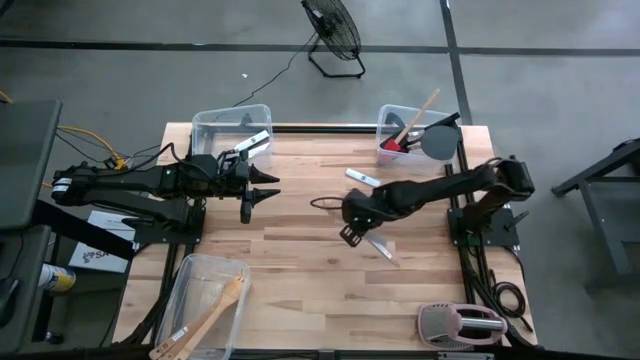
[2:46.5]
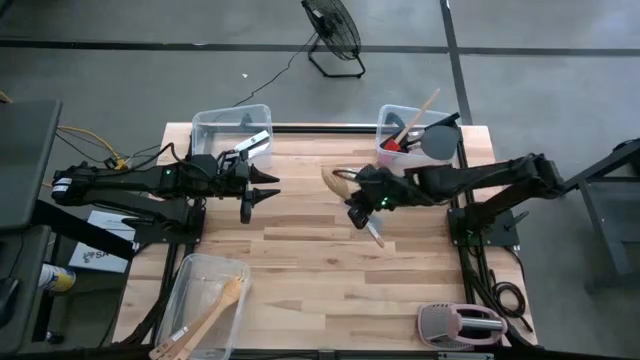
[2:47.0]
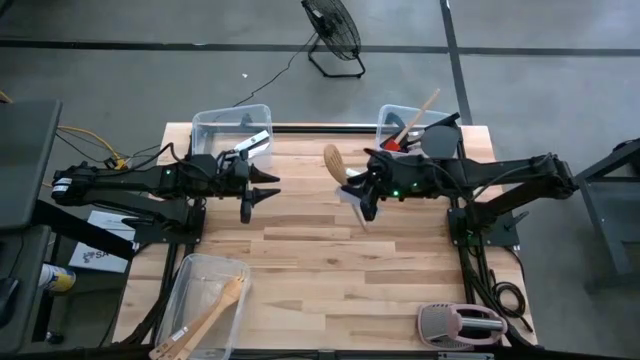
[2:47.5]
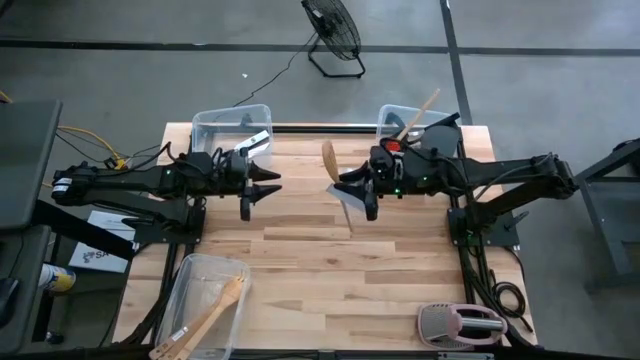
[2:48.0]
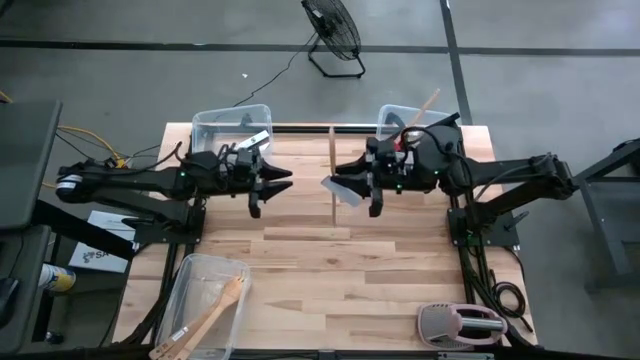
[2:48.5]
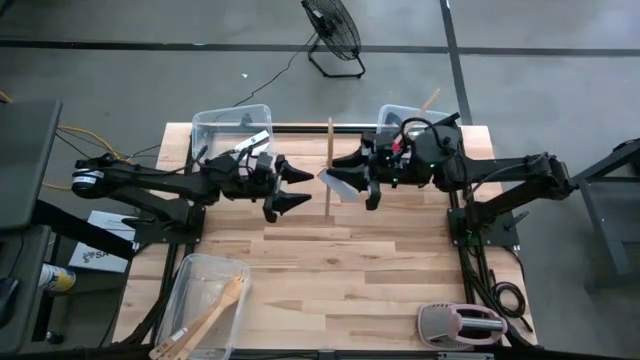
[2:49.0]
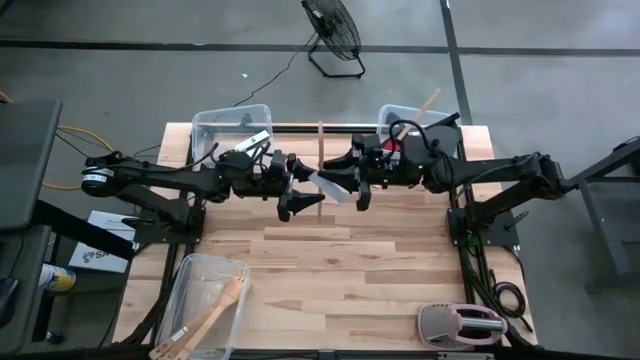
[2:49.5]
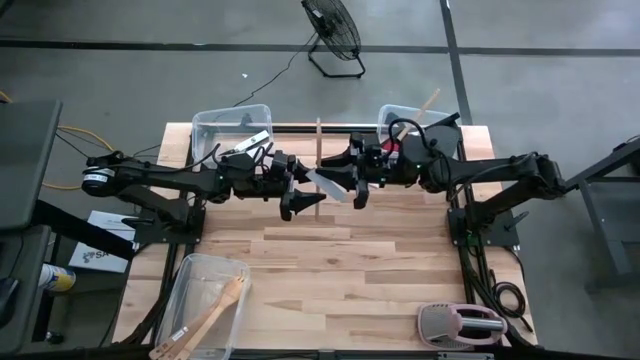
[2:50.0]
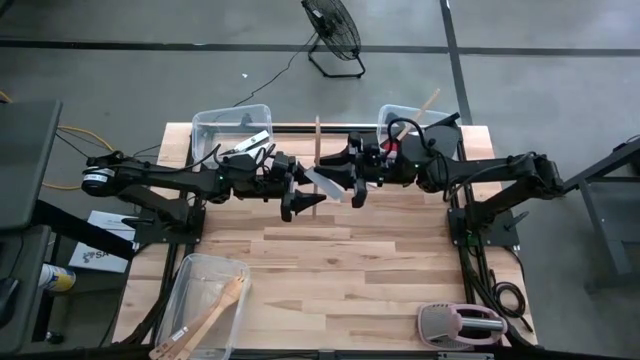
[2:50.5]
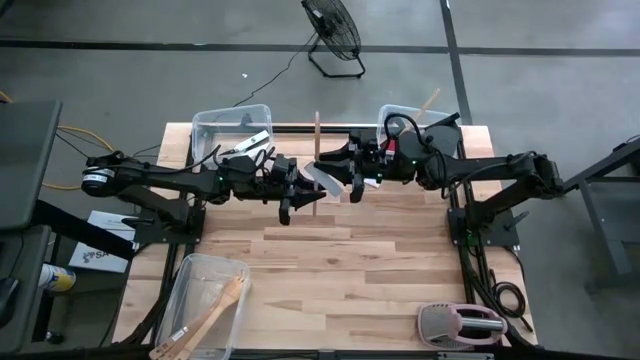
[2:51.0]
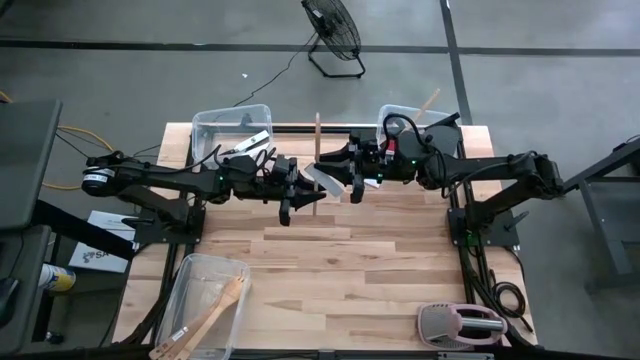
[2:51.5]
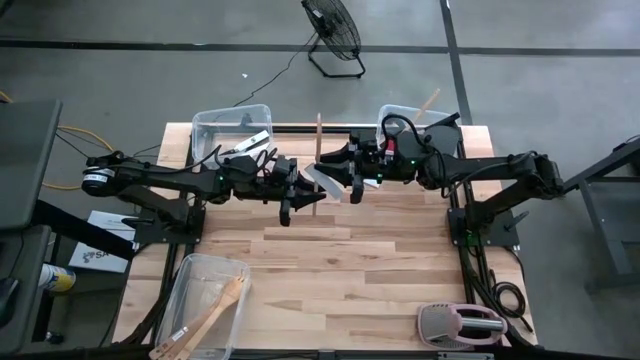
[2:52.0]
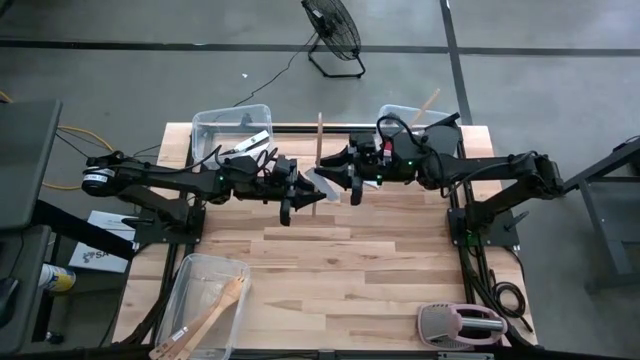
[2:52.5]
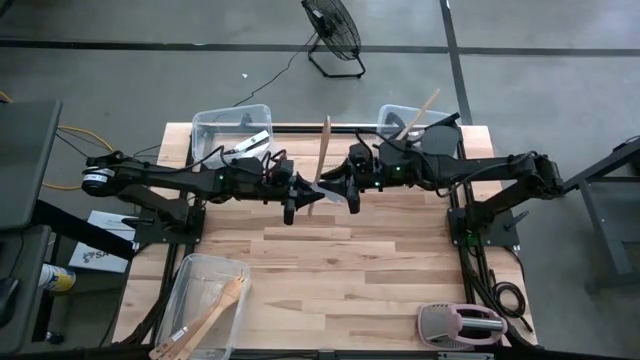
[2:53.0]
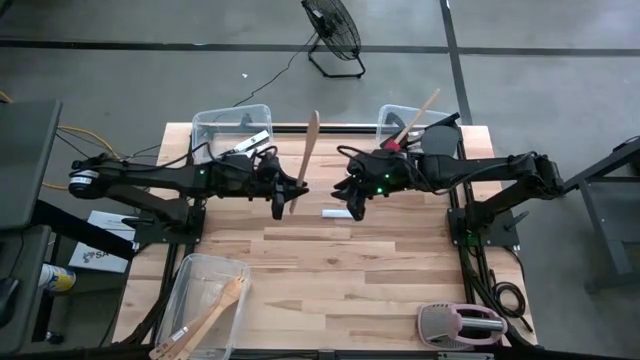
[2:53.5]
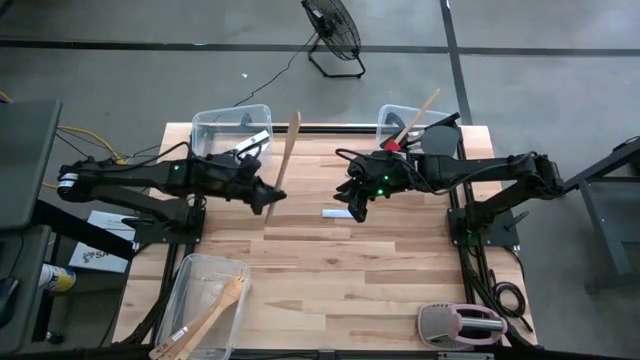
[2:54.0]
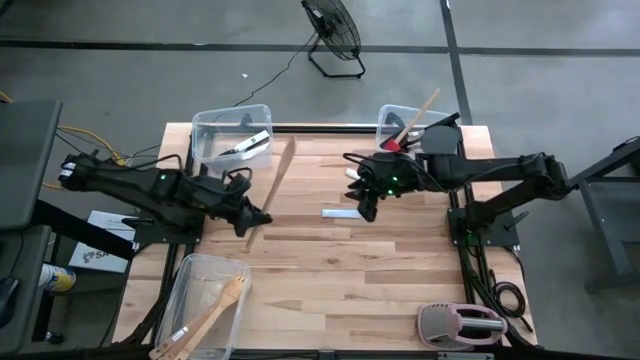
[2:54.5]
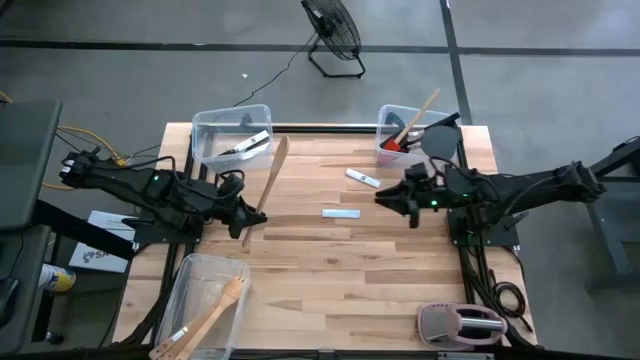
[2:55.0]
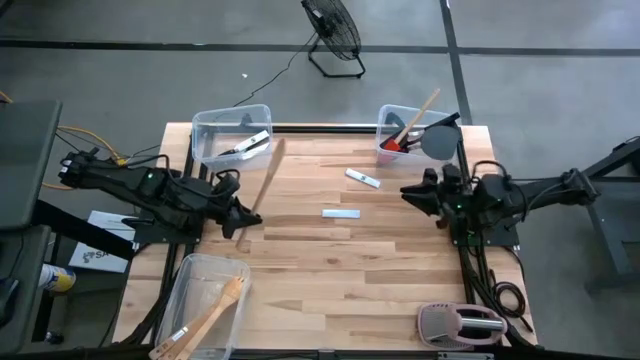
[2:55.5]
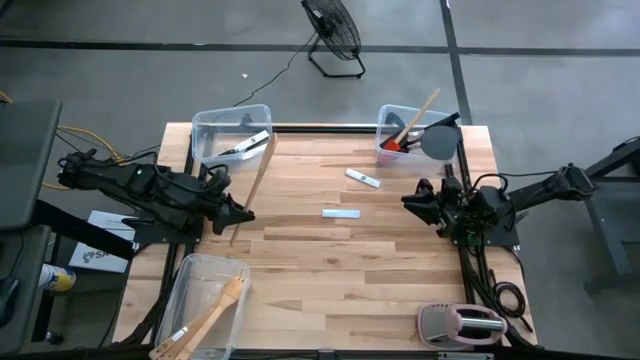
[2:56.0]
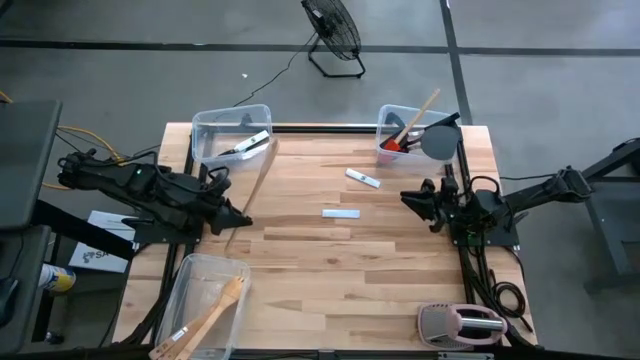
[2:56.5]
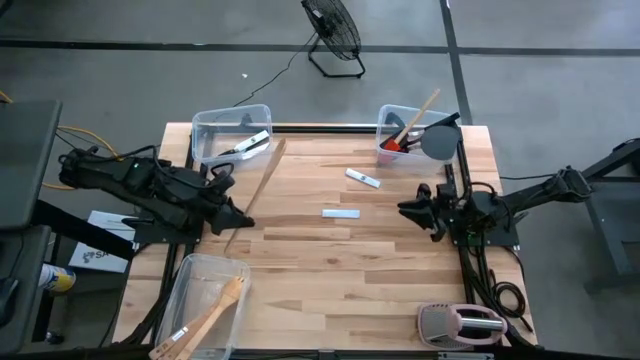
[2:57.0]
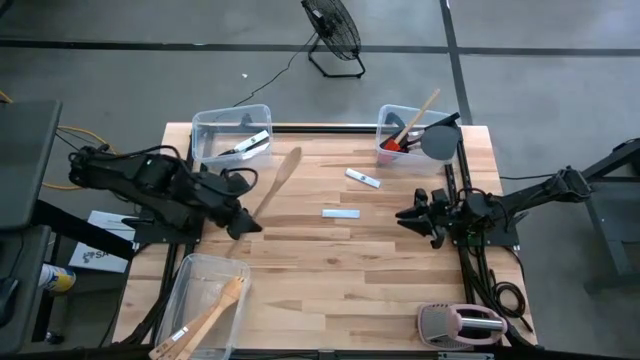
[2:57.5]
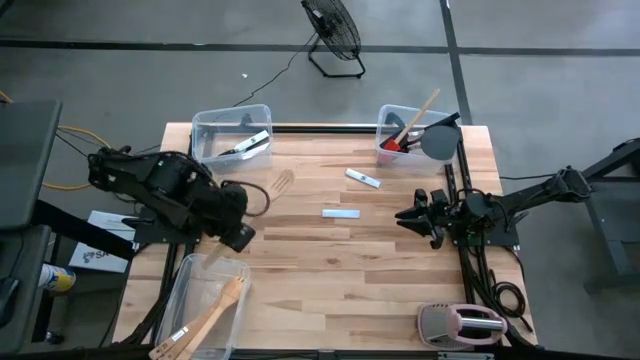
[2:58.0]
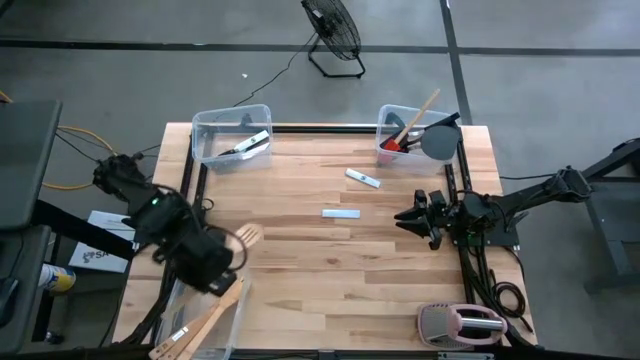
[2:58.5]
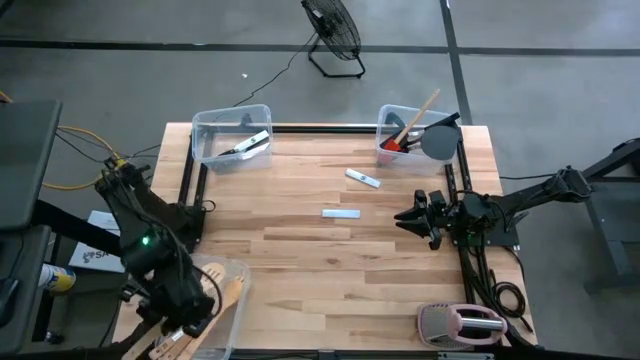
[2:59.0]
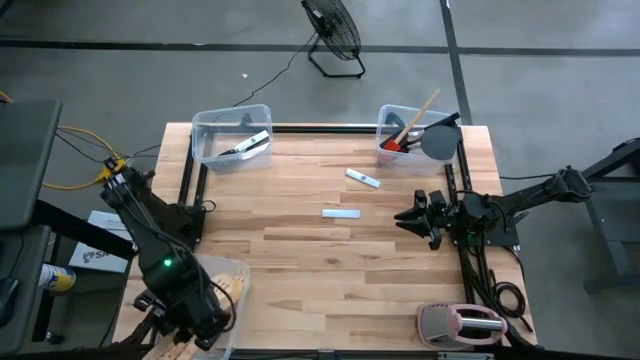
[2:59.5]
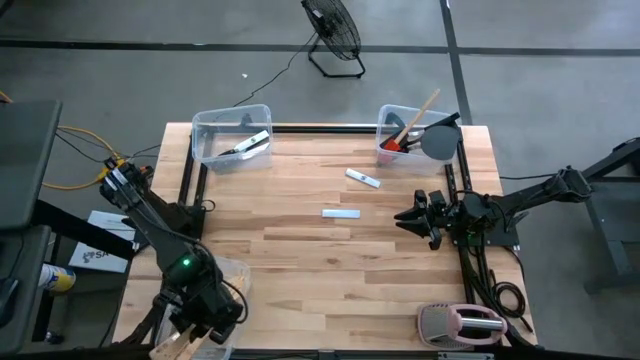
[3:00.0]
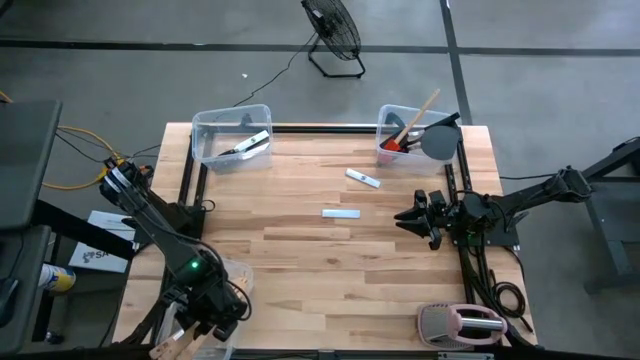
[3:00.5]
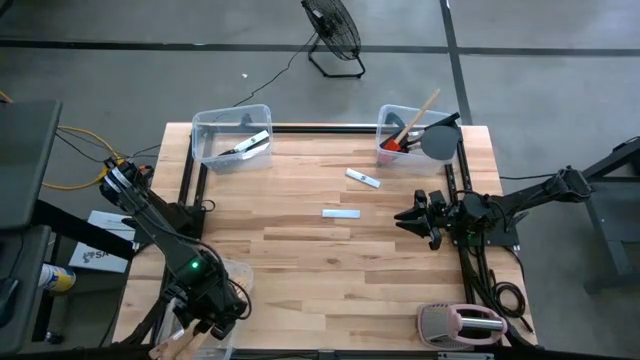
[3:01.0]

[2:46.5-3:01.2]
Task: Pick & Place Kitchen Items
Put the brown serving spoon into the bottom transparent bin

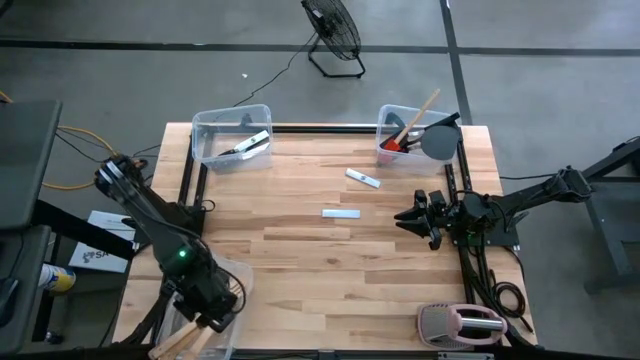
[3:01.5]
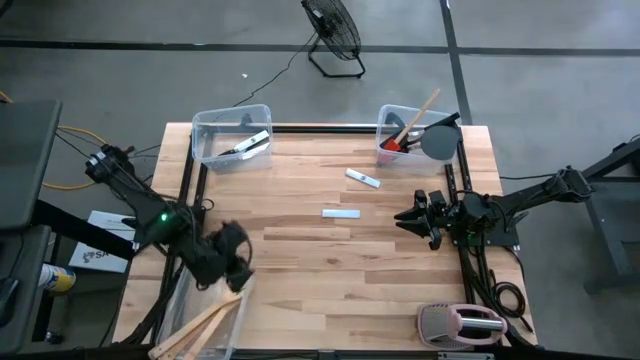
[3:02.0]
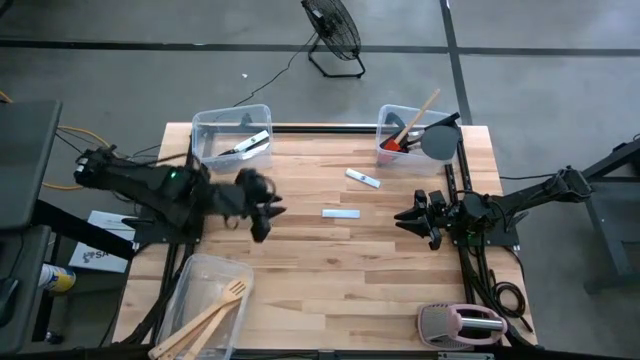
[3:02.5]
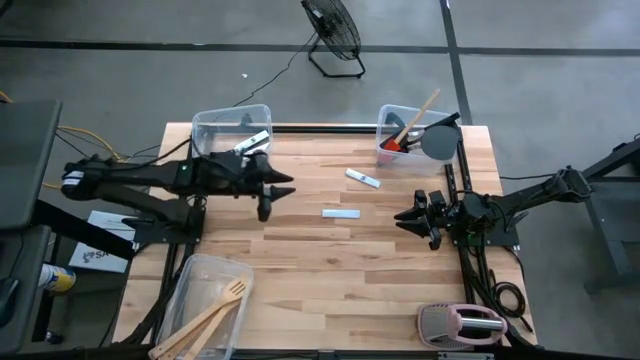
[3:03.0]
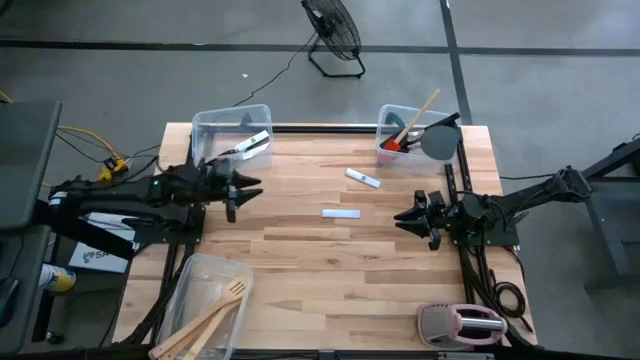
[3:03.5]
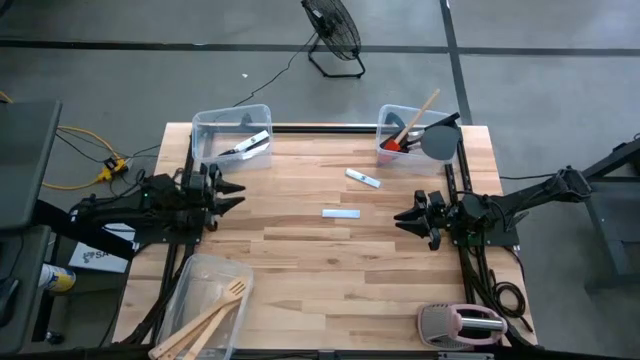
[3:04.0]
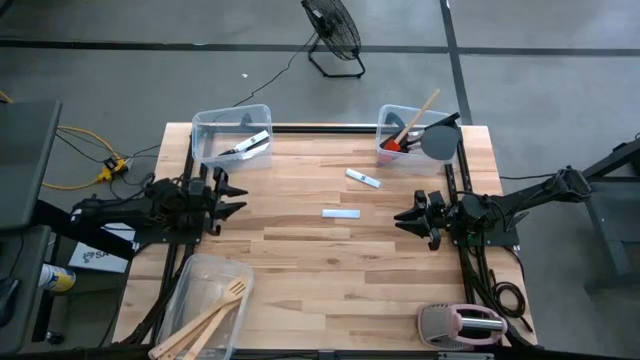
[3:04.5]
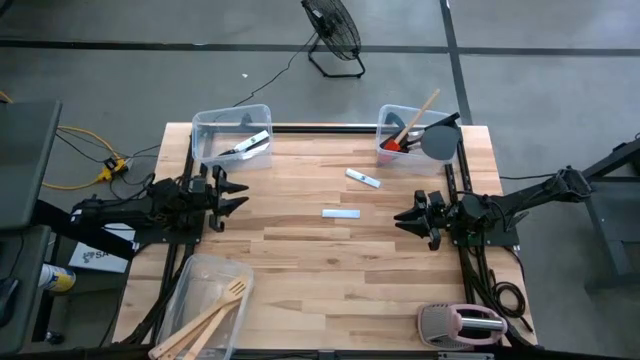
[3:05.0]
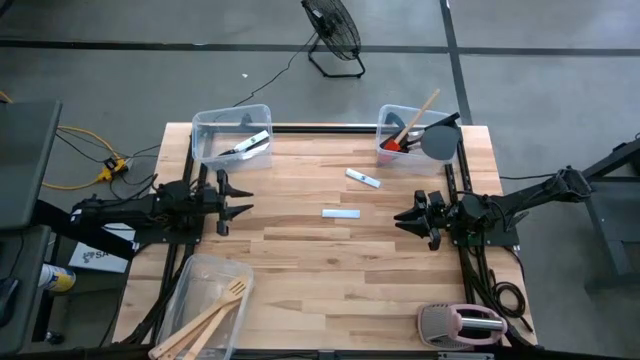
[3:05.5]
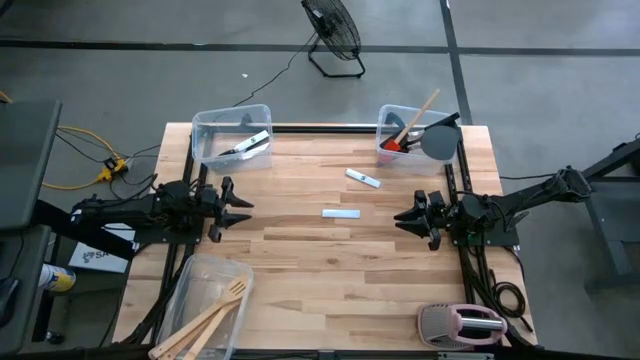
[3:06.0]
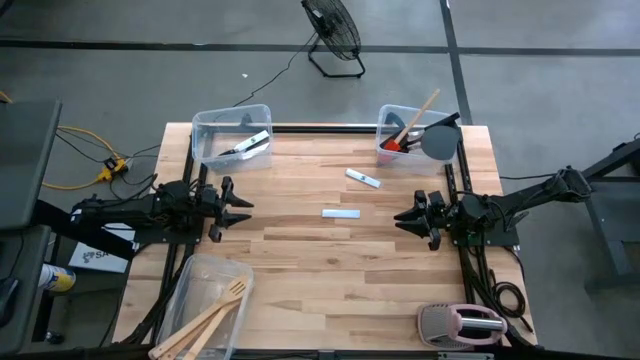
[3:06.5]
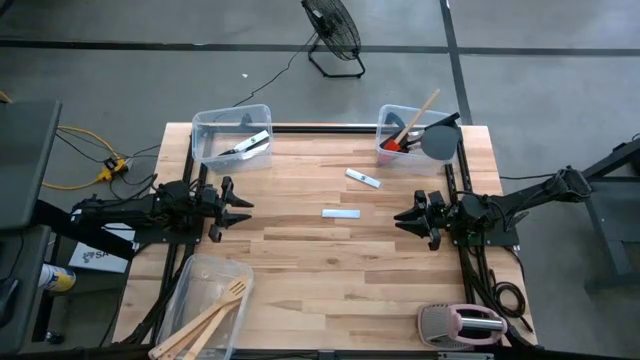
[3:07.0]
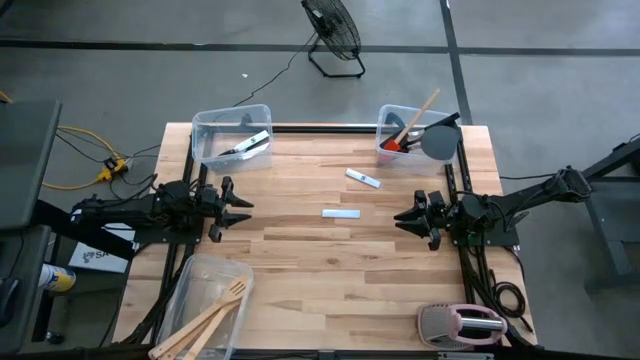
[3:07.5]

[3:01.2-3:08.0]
Return To Home Position
